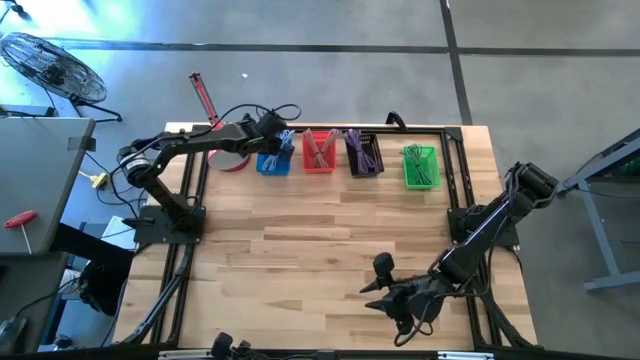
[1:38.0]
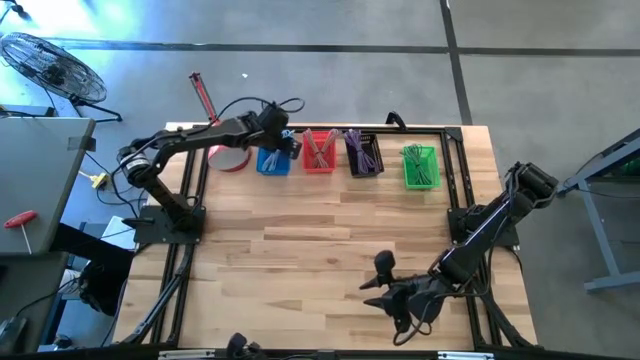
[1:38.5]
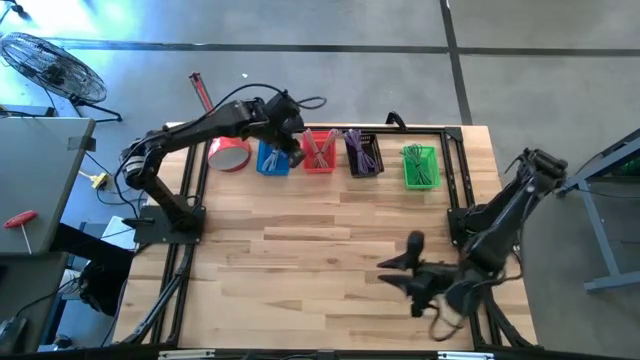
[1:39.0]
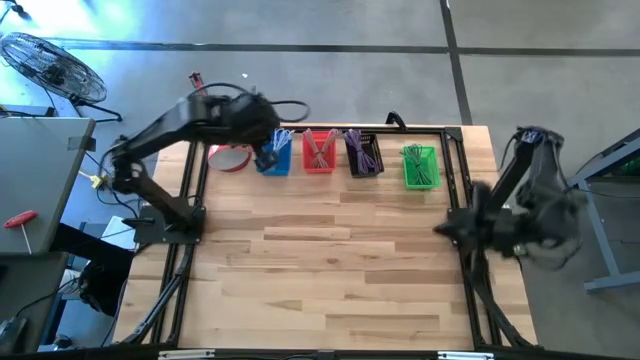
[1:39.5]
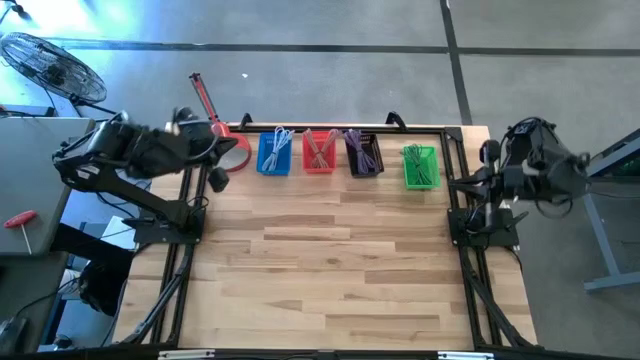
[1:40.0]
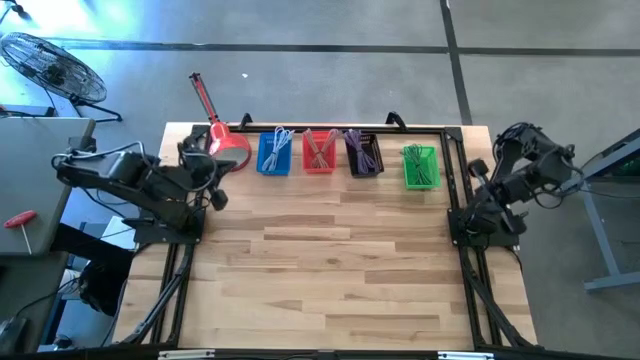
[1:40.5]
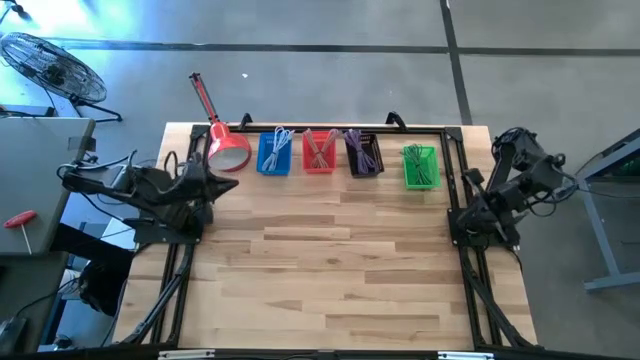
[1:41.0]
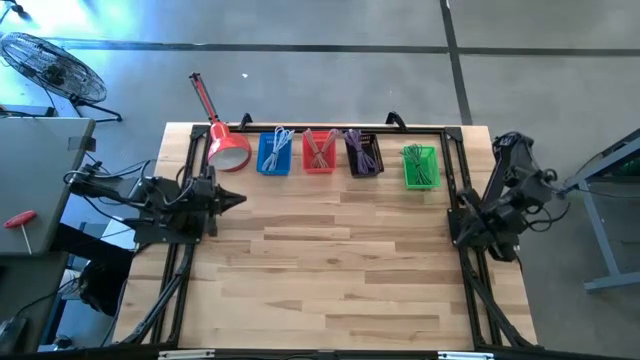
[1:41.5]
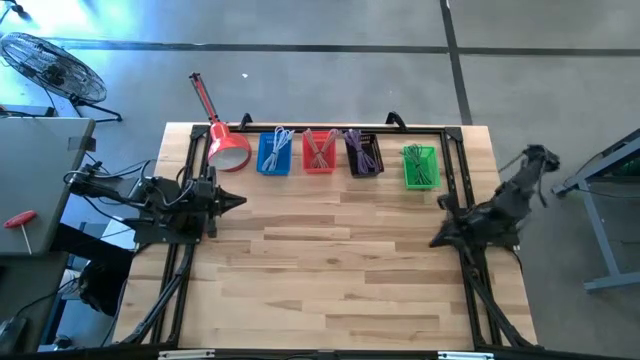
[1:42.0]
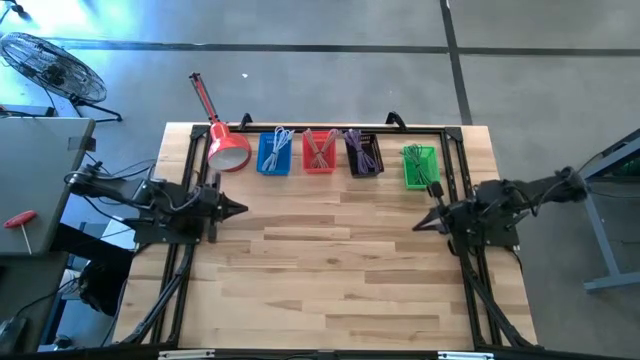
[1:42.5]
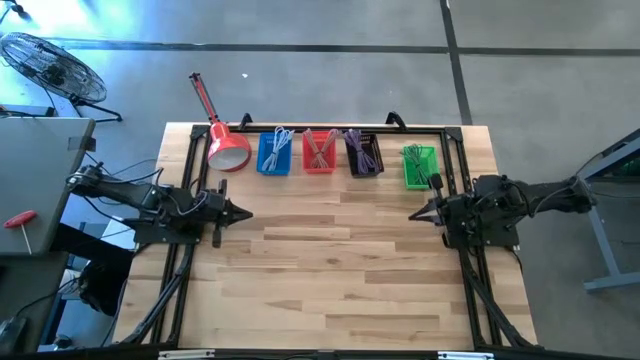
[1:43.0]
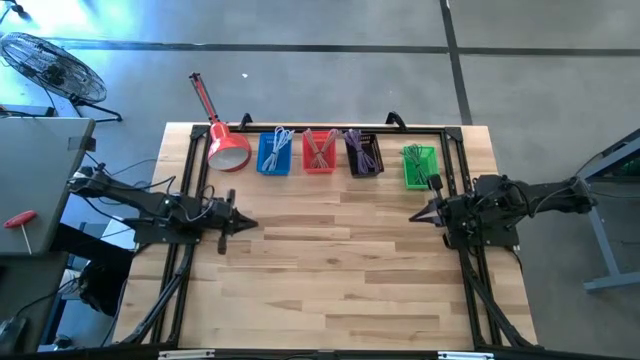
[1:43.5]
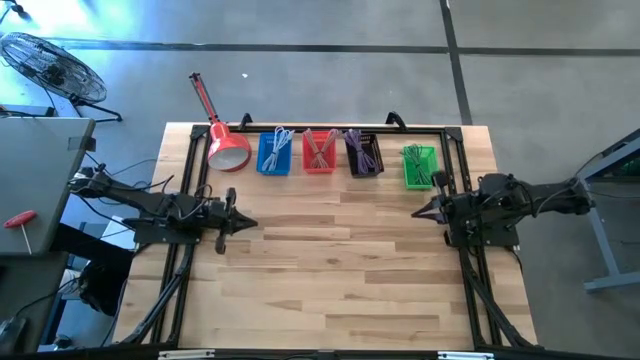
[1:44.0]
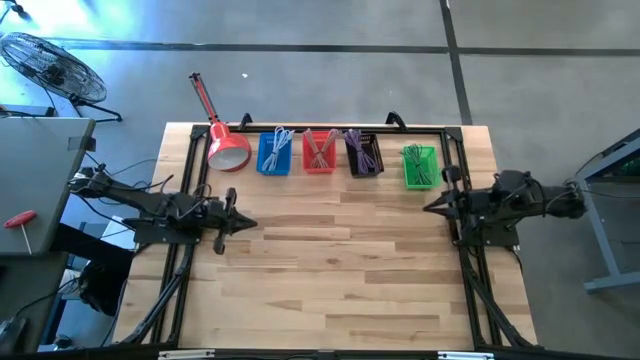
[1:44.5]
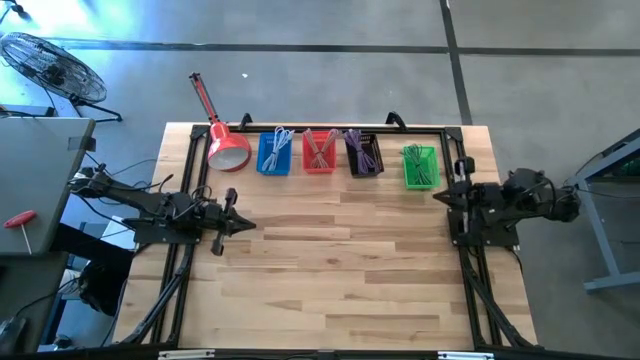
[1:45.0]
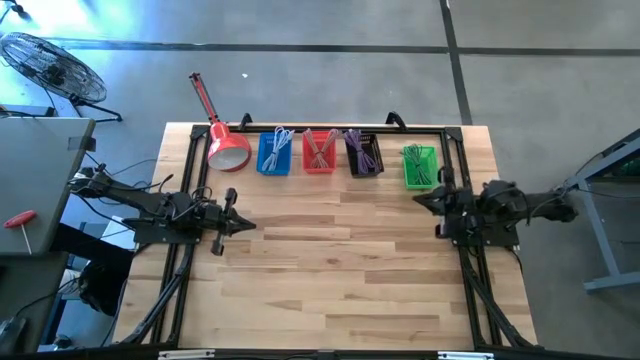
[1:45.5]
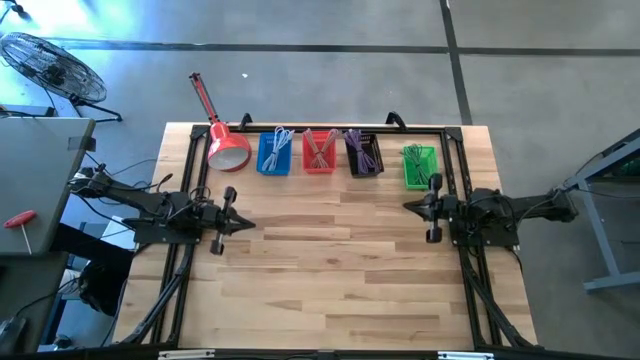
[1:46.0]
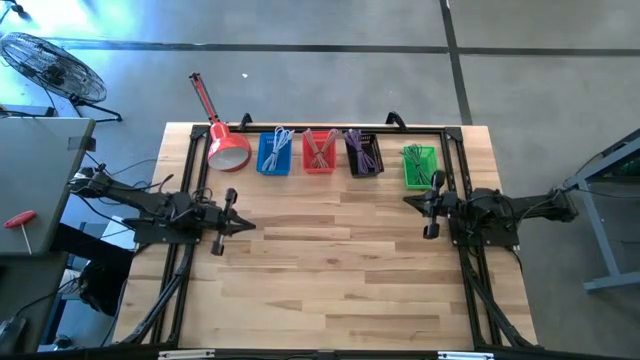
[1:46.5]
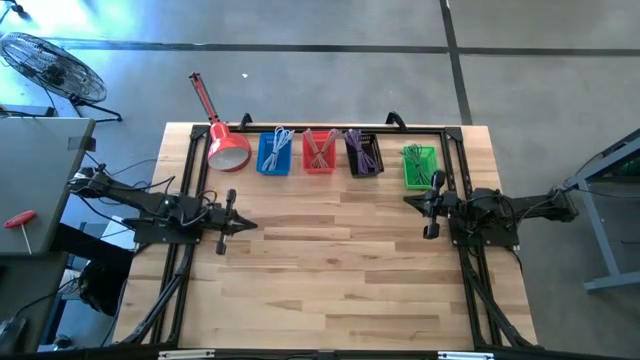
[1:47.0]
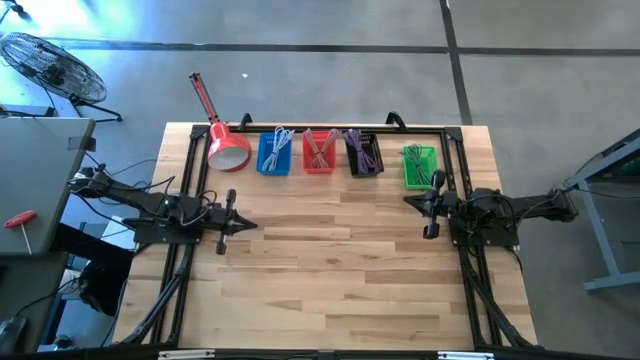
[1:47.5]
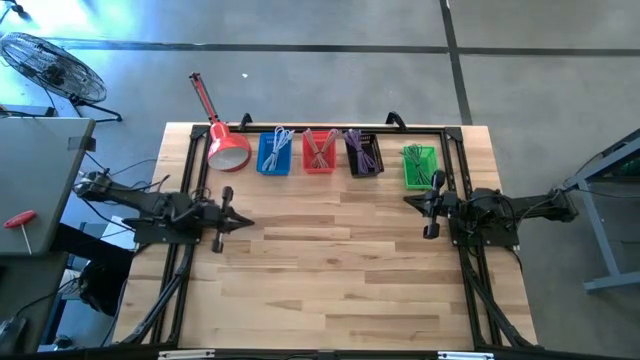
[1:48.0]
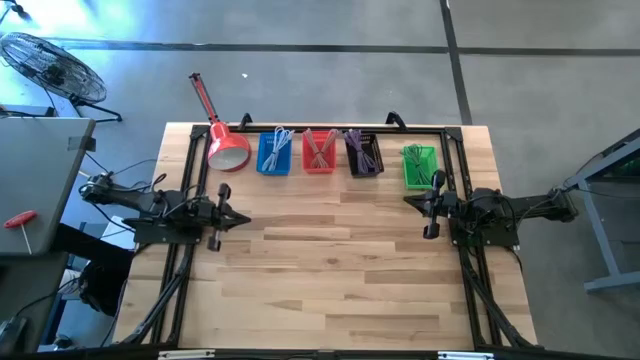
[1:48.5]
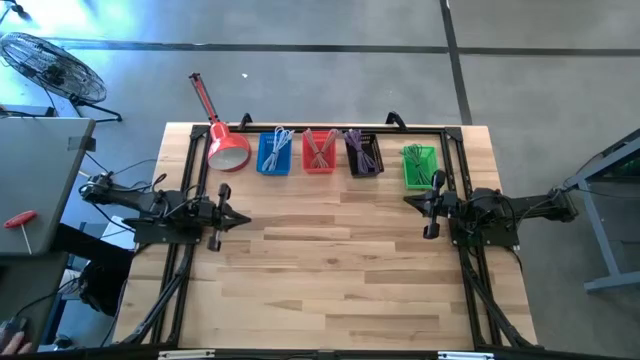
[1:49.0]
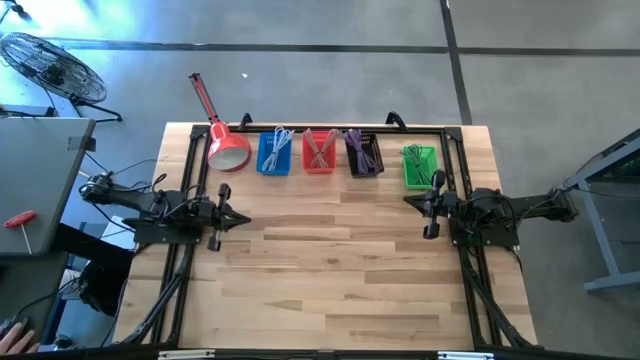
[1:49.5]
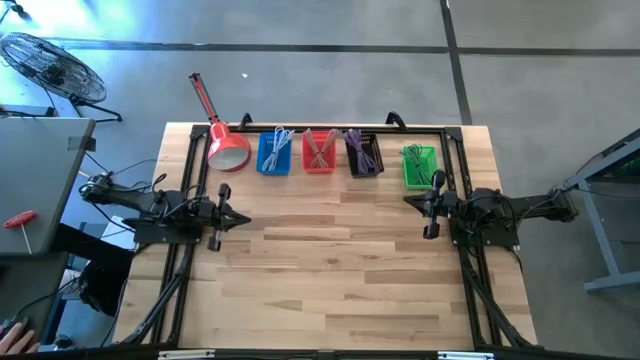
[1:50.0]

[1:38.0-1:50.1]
Task: Pick & Place USB Port
Return to Home Position

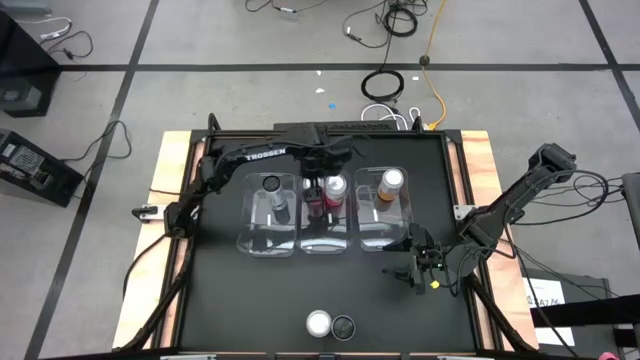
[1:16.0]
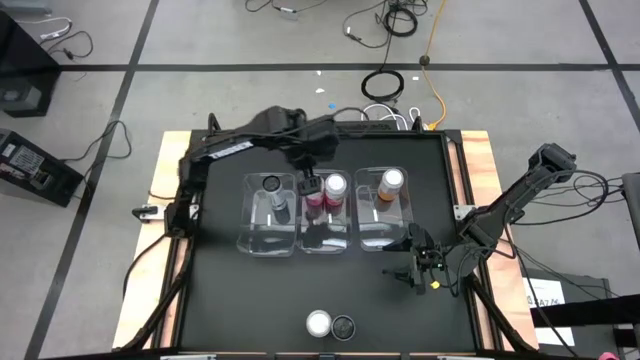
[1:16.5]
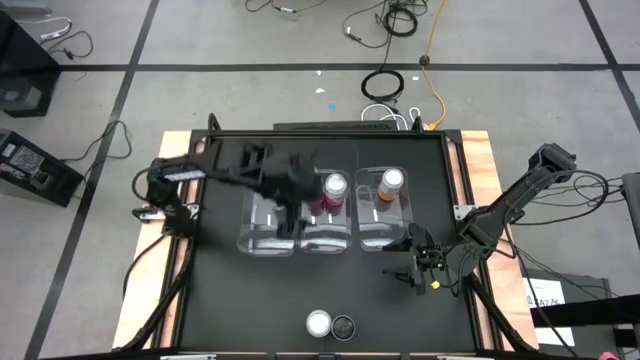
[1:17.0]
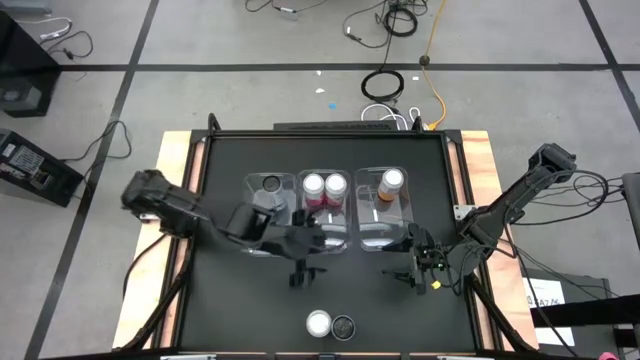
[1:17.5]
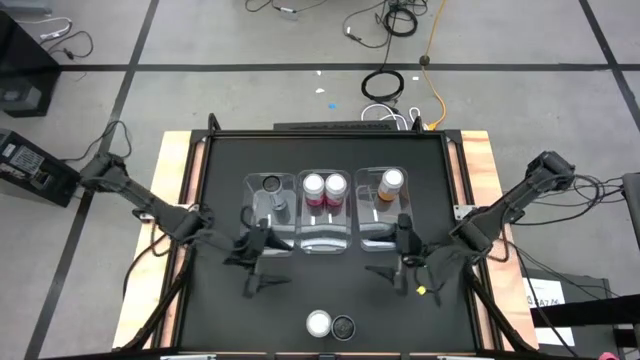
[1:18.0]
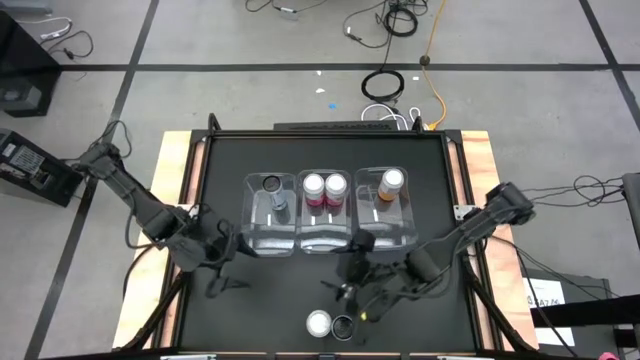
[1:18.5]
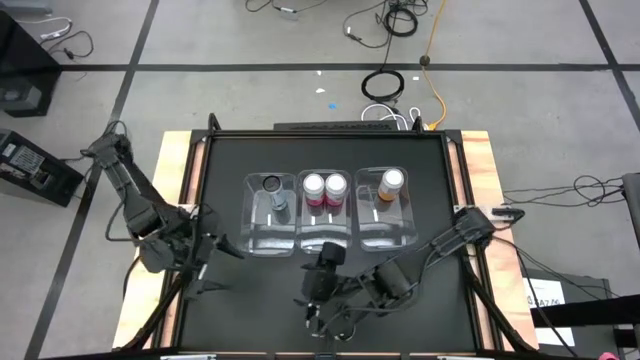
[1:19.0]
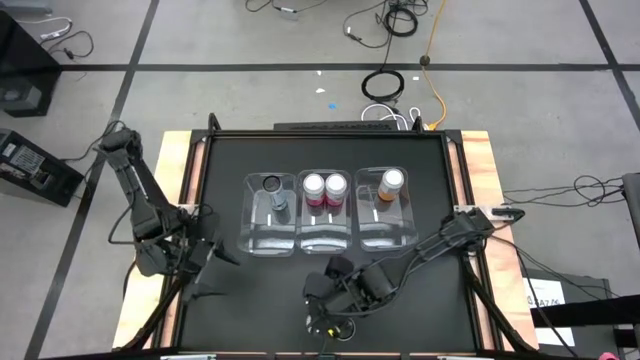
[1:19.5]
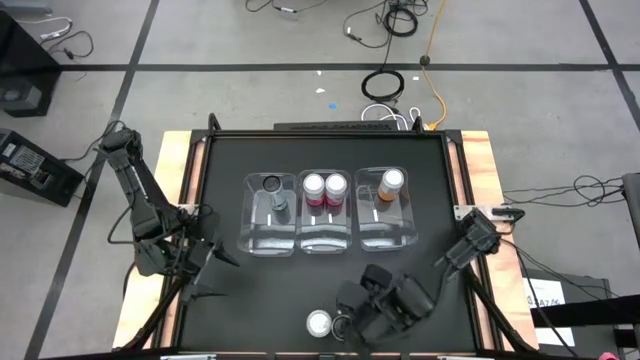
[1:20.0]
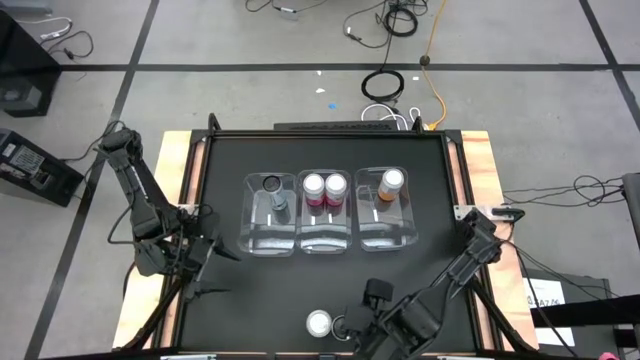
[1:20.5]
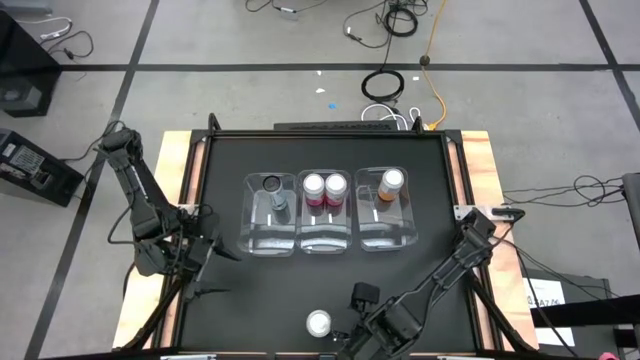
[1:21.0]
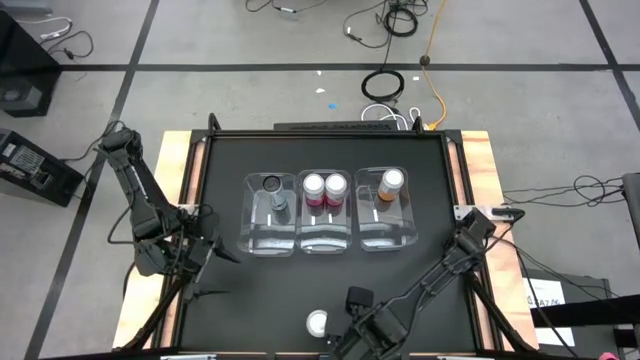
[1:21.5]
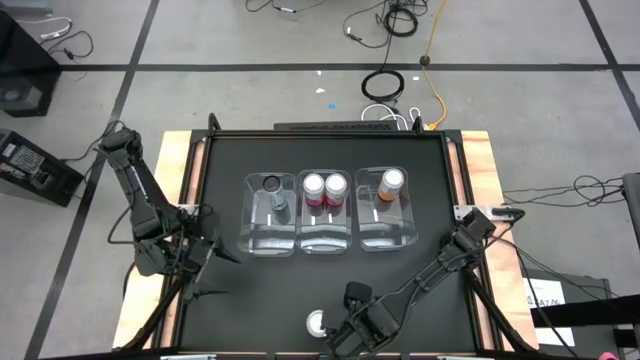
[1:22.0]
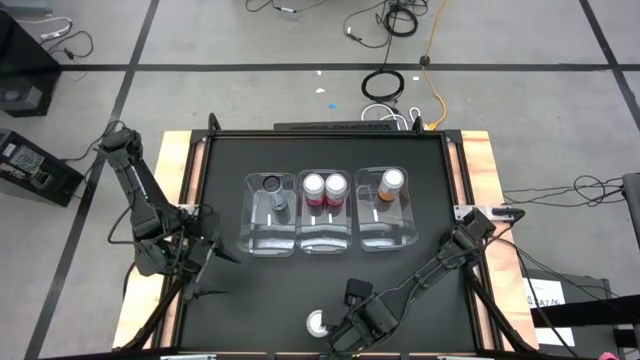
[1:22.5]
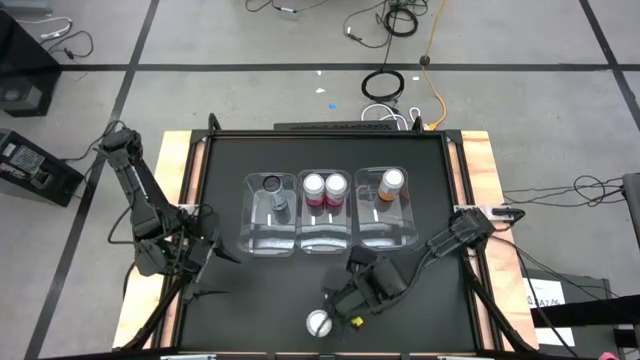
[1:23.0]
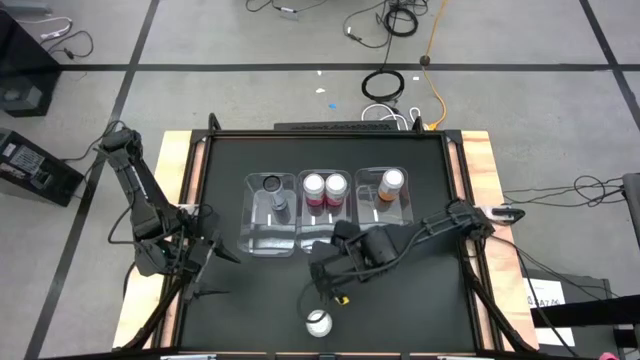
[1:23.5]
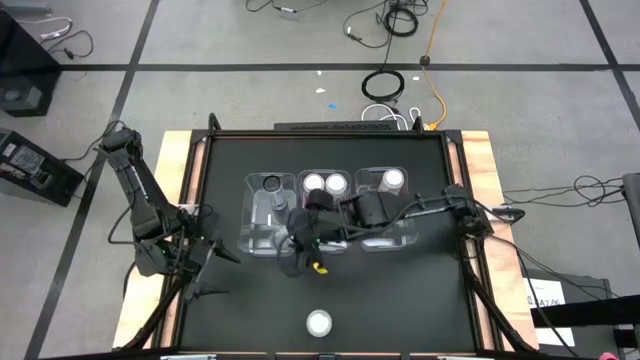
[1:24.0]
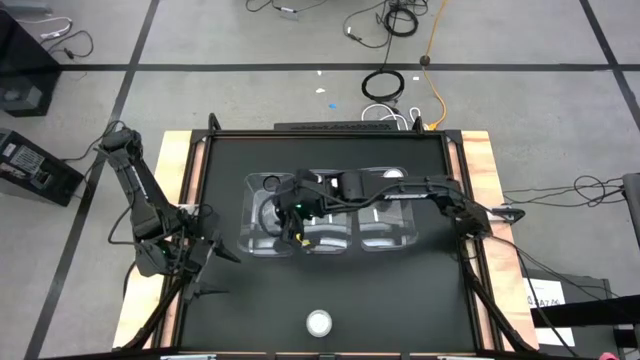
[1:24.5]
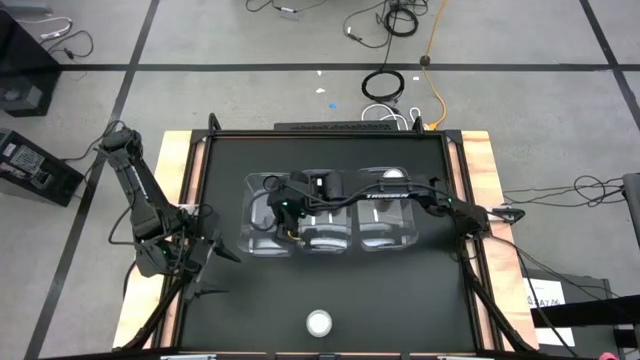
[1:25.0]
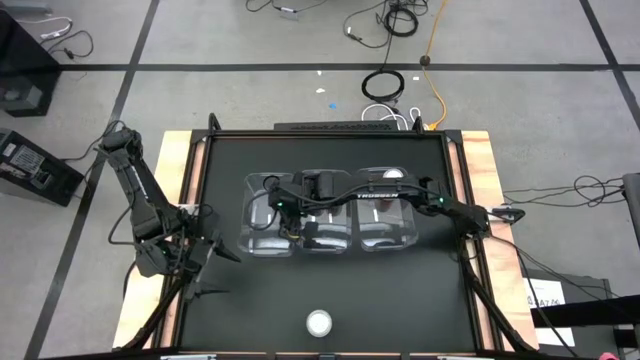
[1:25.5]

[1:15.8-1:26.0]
Task: Sort soda cans
Put the blue soda can into the left transparent bin
